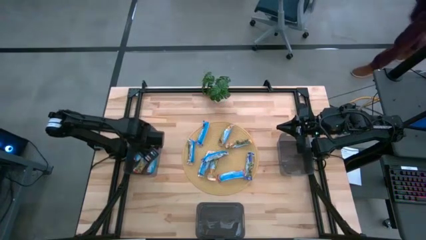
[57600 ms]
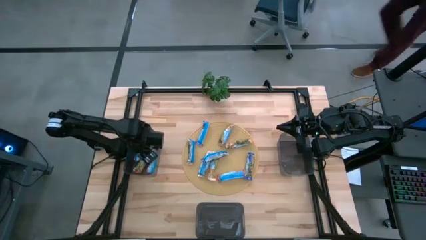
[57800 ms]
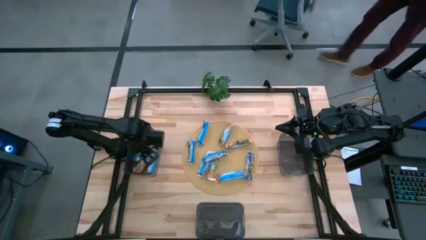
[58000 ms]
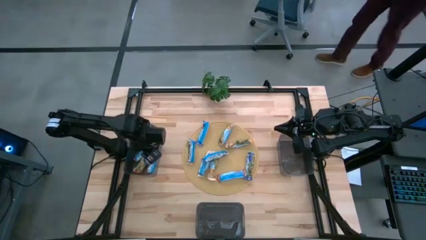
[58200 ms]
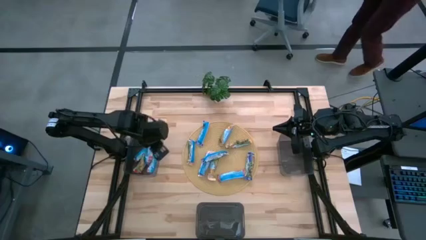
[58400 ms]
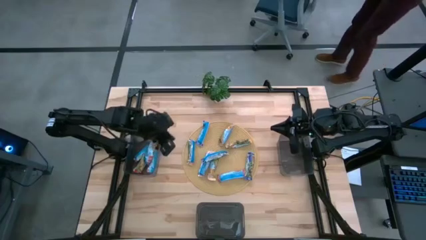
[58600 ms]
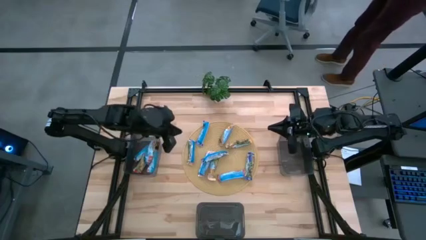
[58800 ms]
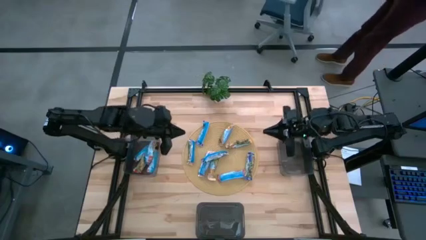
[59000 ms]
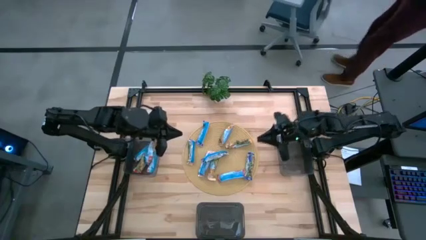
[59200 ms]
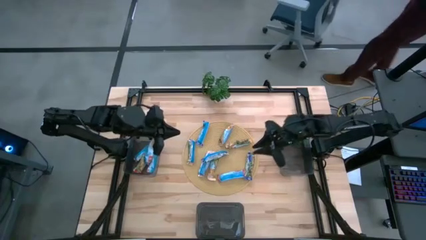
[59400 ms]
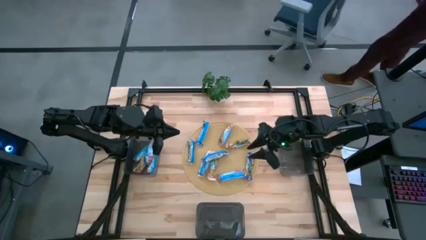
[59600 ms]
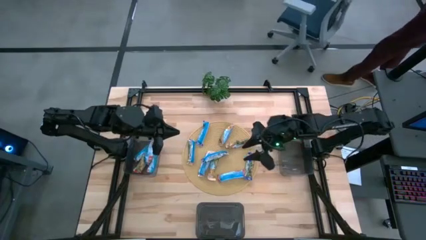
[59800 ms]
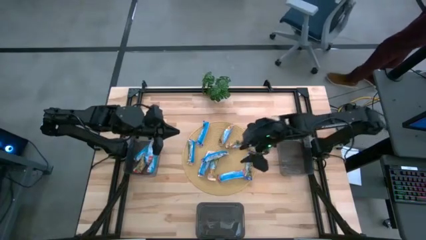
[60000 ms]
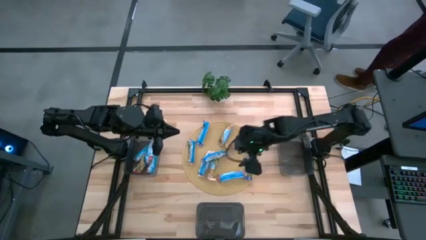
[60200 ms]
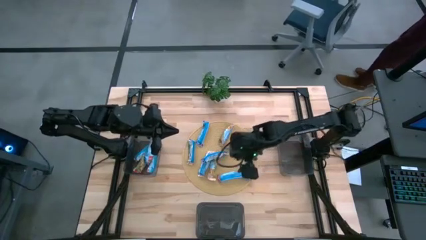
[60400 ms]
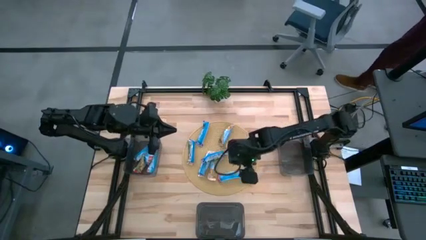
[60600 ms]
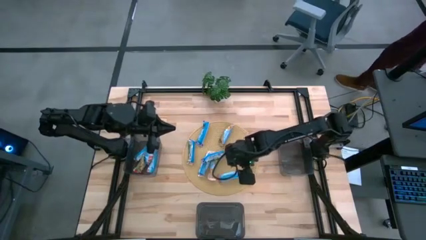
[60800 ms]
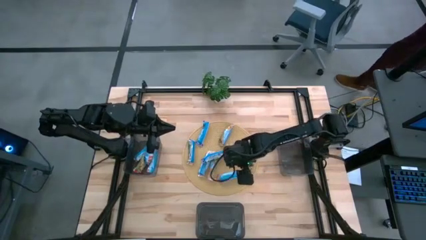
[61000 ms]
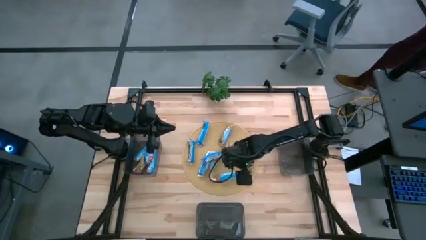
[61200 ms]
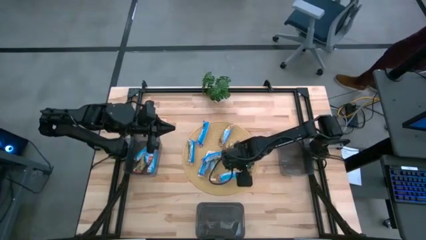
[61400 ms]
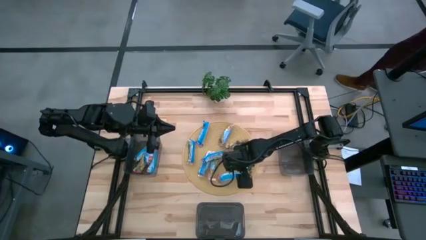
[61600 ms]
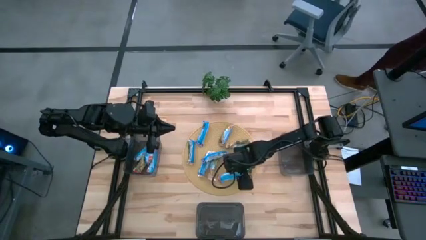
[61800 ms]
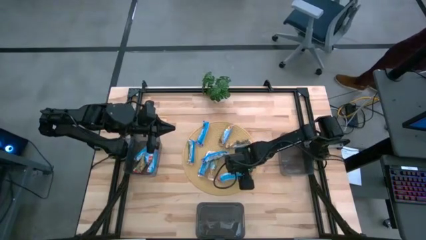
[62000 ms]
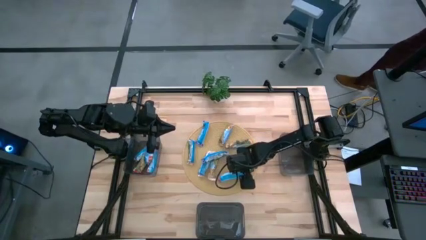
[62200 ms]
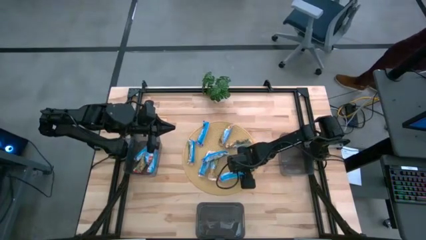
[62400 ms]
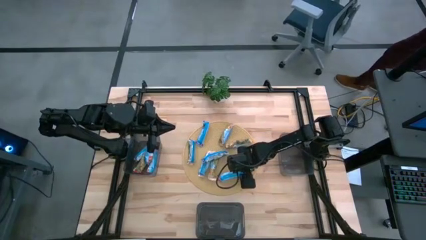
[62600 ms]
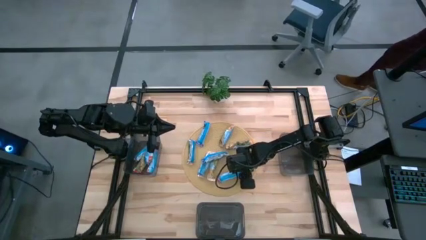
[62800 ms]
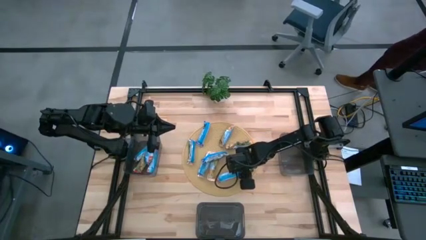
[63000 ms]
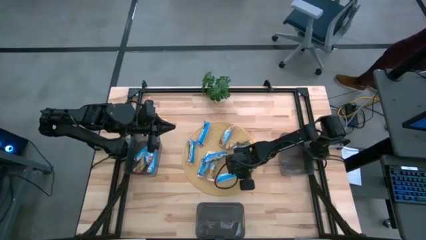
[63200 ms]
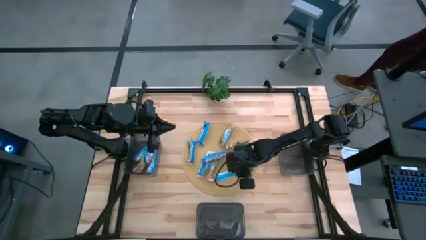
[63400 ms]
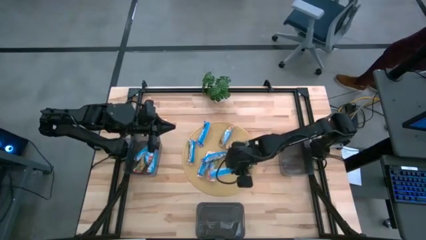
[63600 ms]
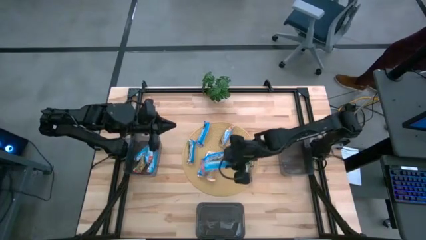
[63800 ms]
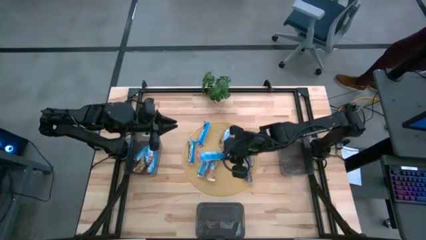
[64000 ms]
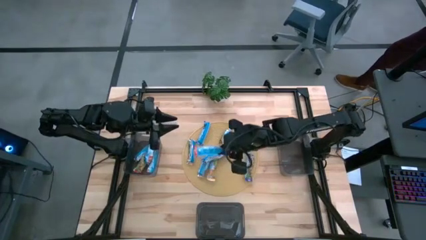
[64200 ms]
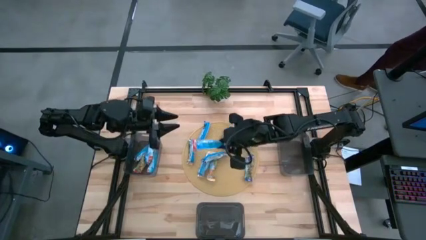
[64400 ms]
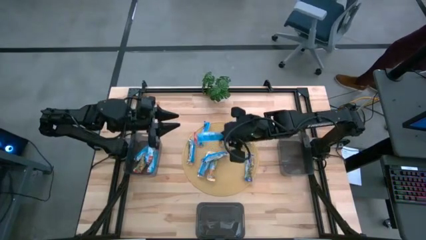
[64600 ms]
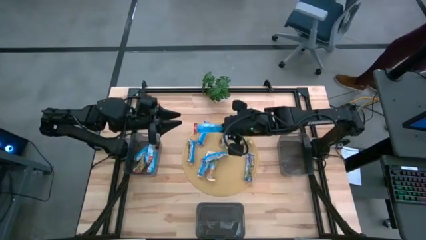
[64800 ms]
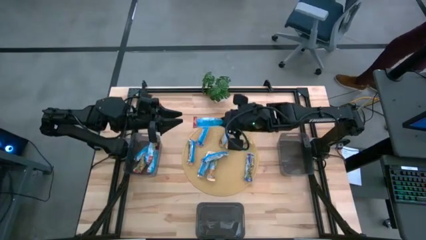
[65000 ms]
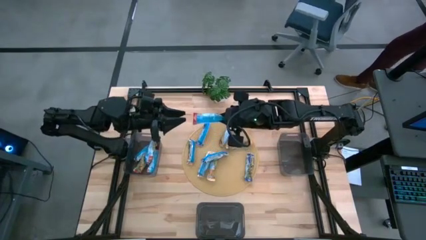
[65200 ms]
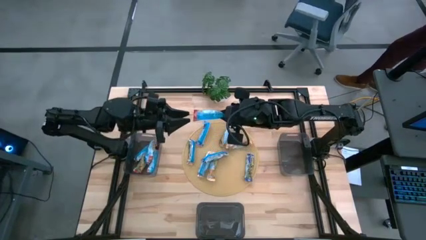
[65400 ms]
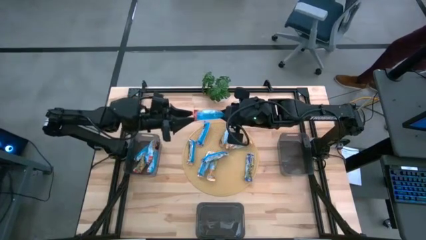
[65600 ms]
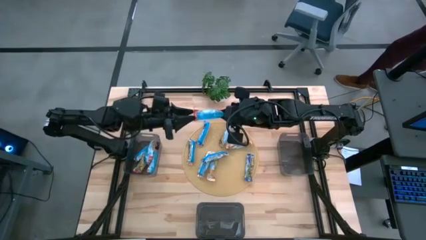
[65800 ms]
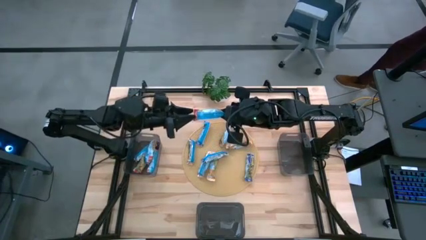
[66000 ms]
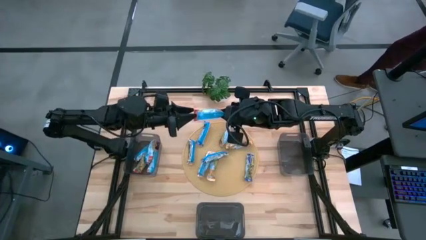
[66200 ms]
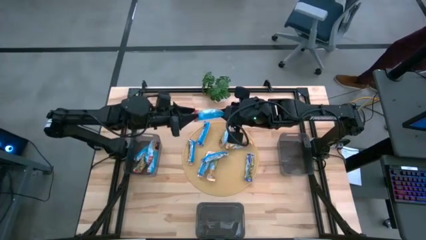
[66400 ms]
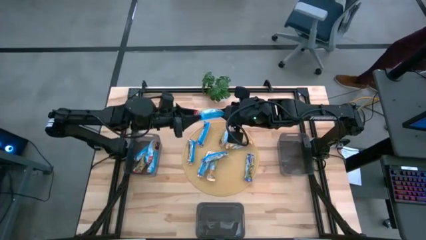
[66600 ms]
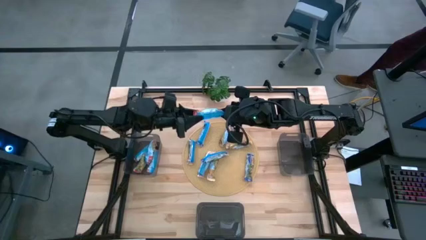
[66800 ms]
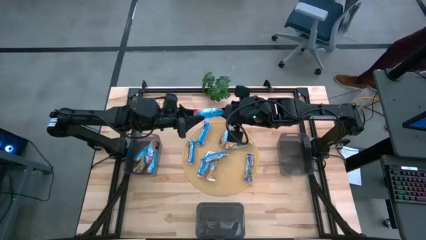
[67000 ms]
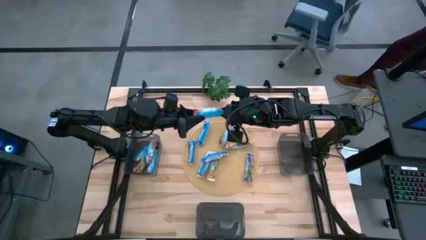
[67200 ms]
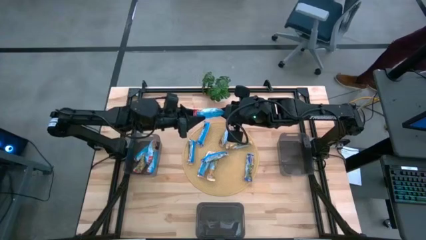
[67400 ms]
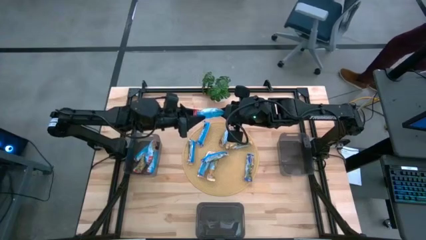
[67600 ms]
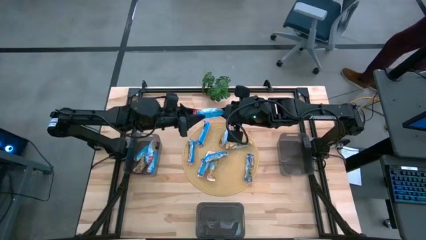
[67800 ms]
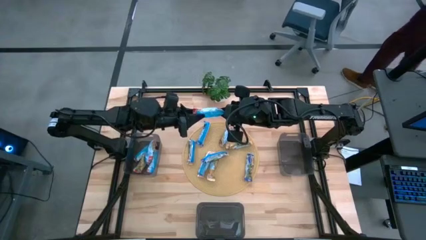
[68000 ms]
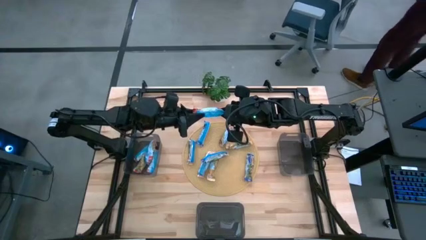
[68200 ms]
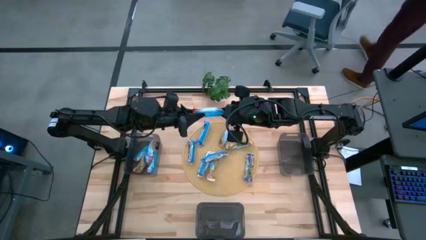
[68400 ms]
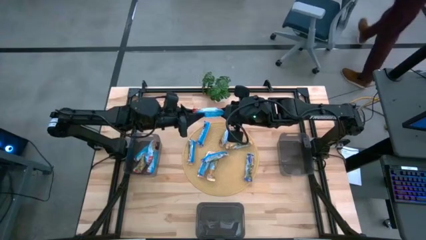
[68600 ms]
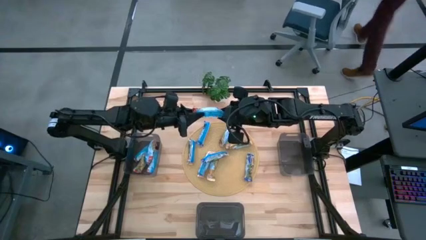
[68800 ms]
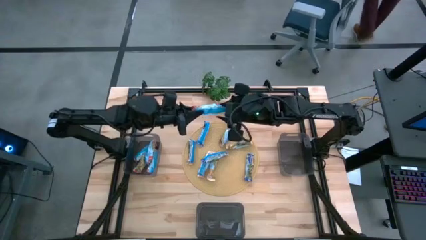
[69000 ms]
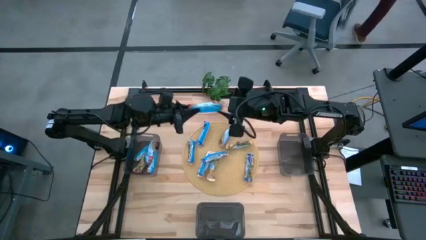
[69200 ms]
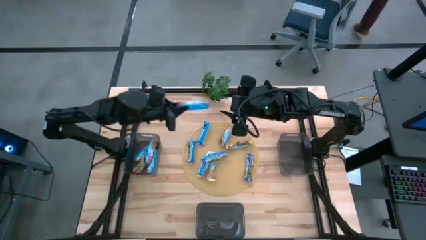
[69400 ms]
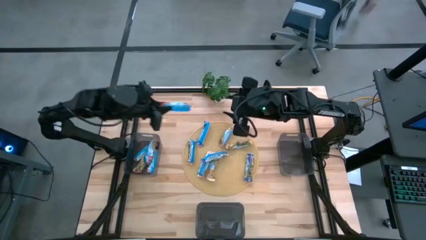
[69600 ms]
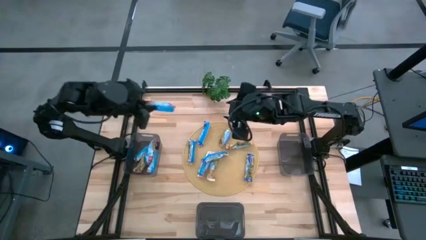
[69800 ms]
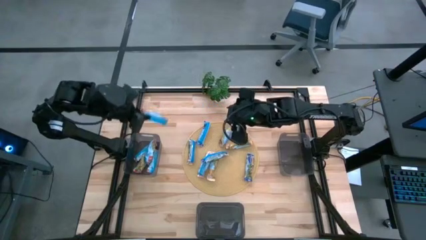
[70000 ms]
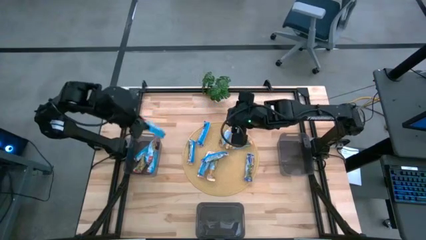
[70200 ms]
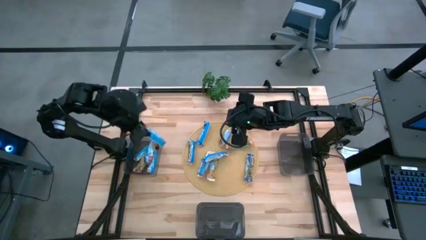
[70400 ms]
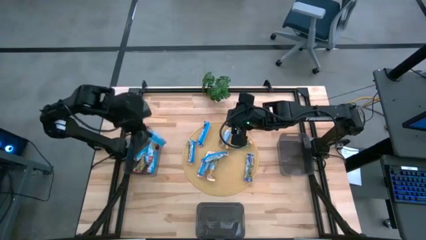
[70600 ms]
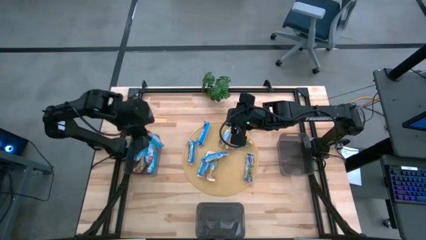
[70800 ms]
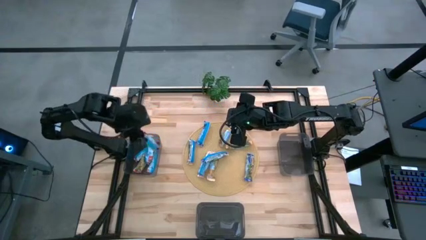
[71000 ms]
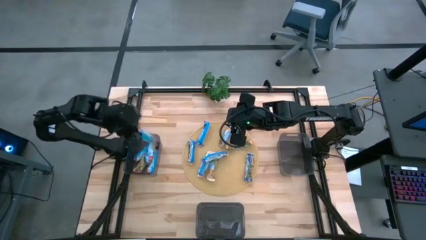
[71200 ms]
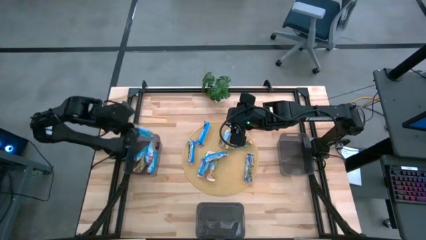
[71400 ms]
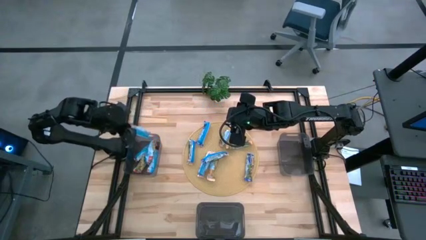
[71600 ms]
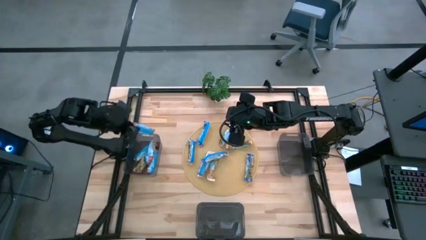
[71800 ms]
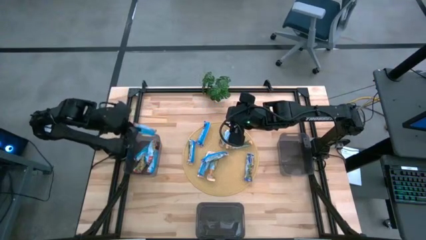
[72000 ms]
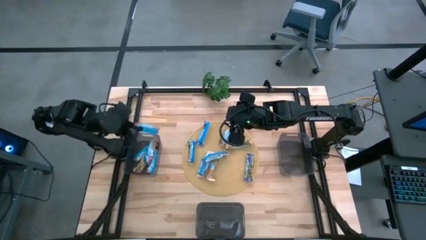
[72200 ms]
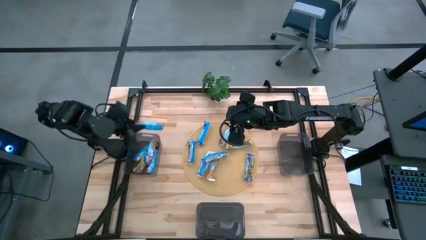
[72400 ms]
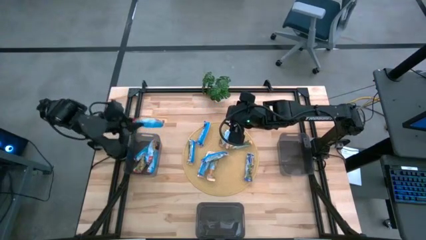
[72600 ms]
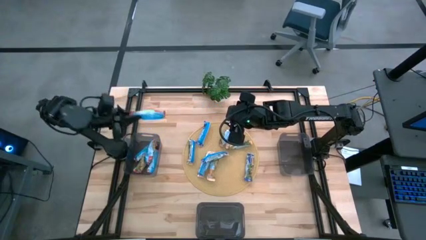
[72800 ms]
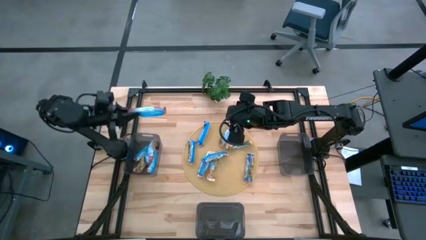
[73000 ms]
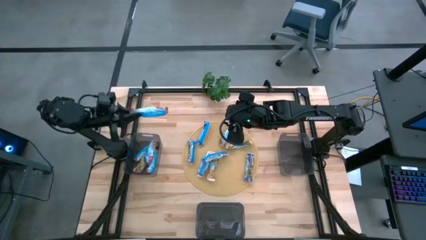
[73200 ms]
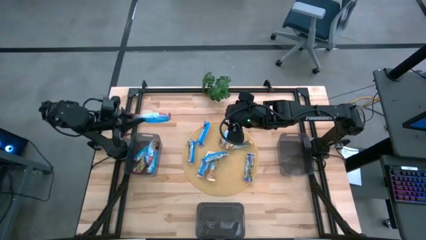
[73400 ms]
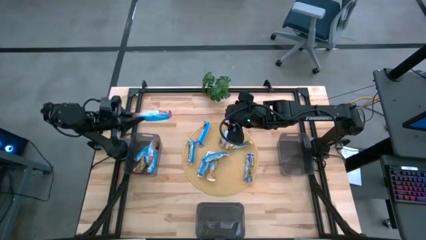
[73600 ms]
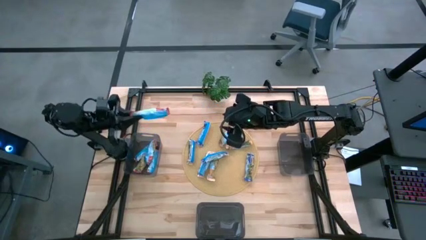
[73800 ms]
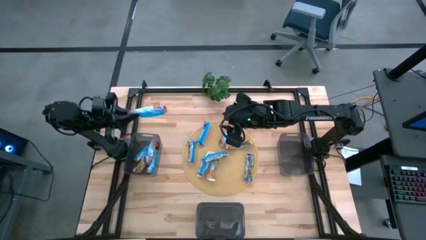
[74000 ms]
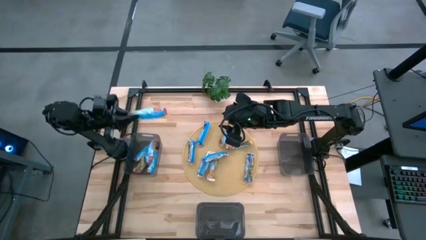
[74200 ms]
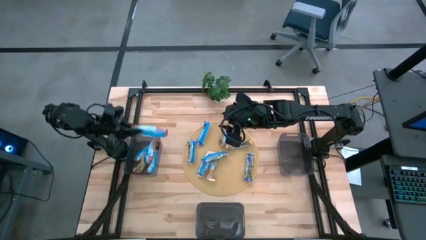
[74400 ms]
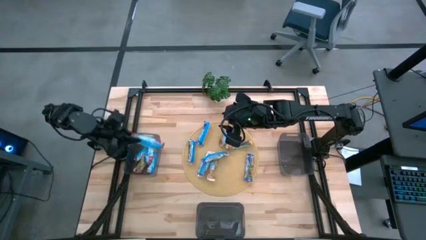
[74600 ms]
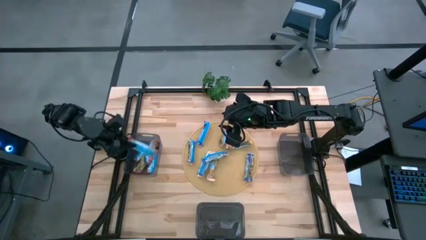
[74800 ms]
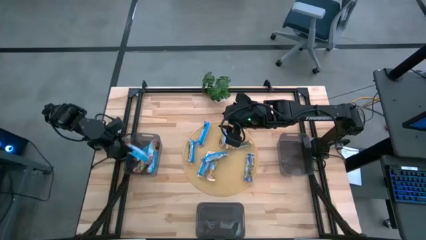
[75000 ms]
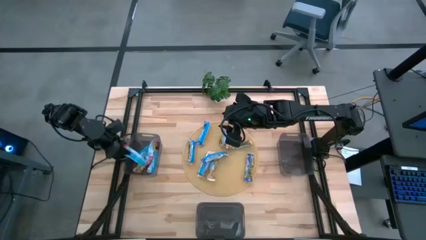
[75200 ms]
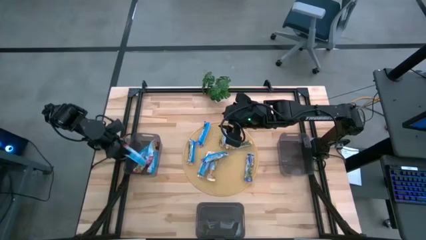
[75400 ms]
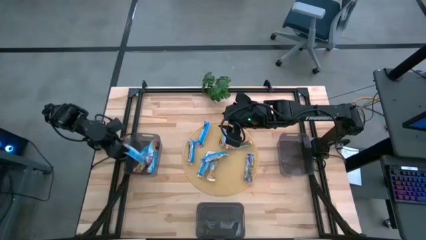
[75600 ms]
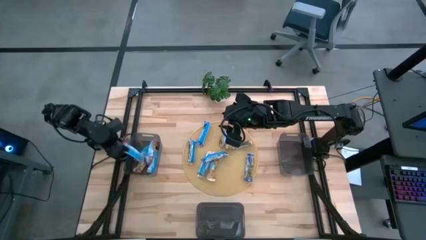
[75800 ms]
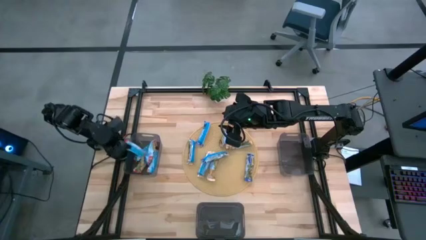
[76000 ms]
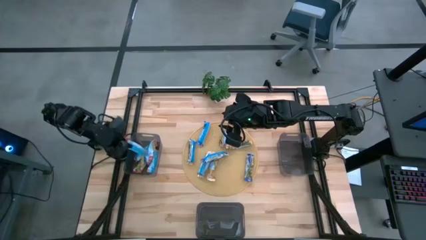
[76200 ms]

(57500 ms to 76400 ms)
Task: Pick and place Granola Bars by type
Put the red granola bar into the top left bin
